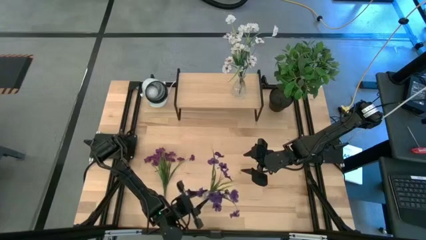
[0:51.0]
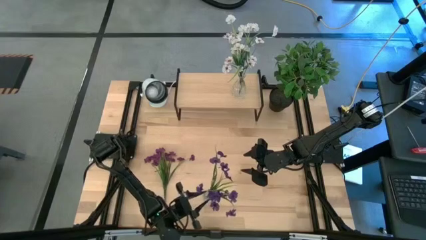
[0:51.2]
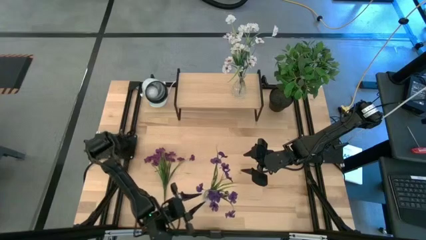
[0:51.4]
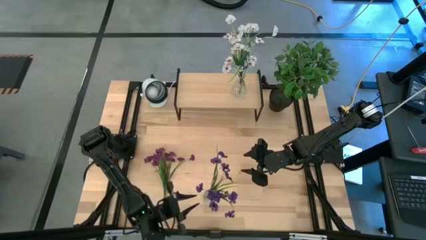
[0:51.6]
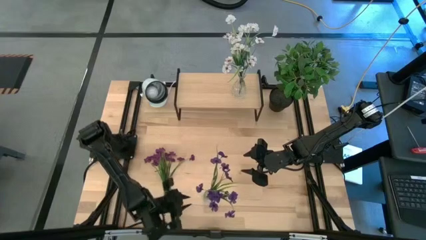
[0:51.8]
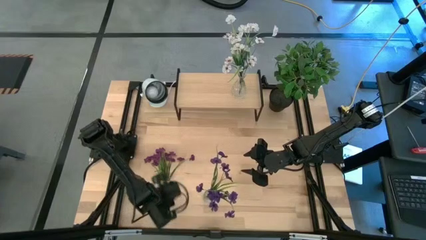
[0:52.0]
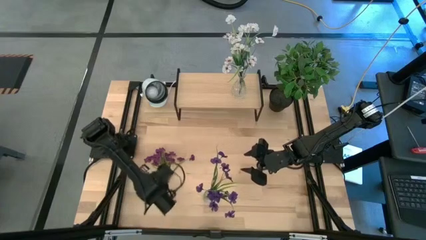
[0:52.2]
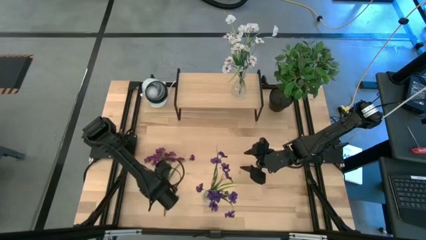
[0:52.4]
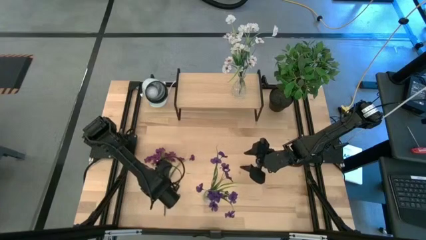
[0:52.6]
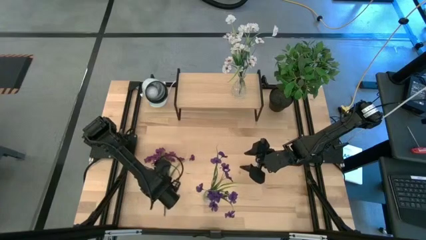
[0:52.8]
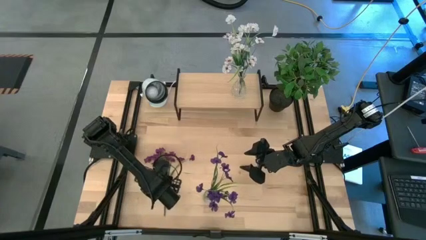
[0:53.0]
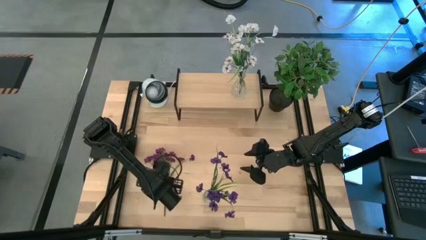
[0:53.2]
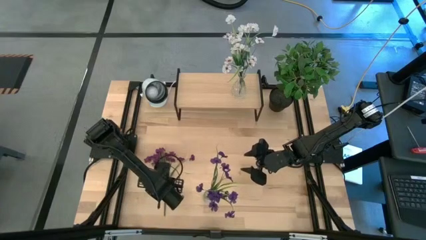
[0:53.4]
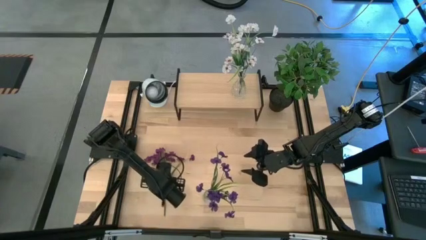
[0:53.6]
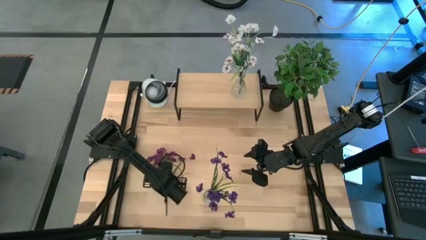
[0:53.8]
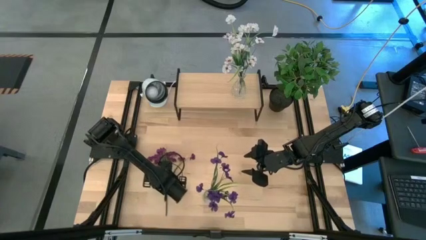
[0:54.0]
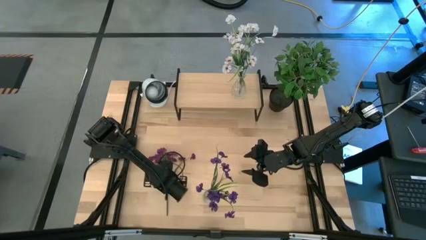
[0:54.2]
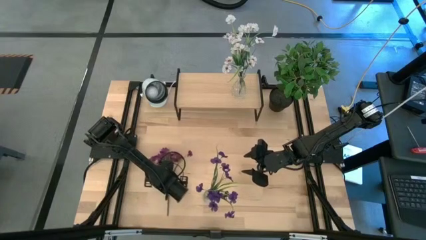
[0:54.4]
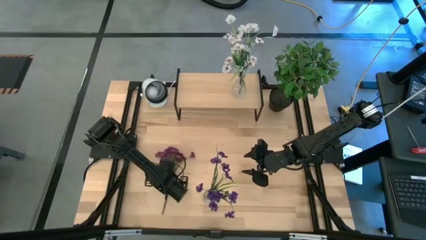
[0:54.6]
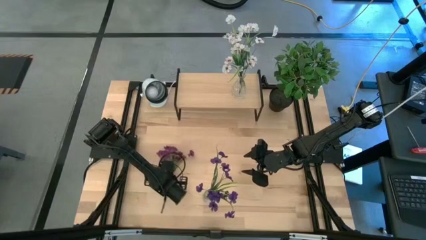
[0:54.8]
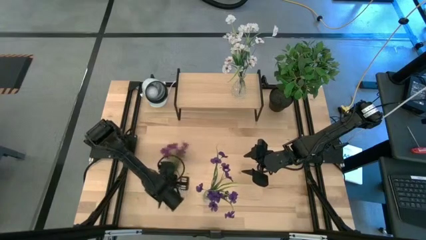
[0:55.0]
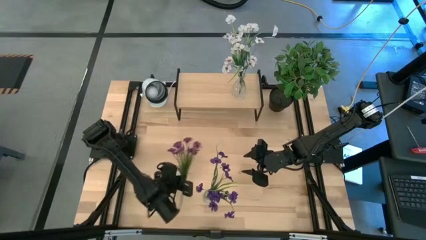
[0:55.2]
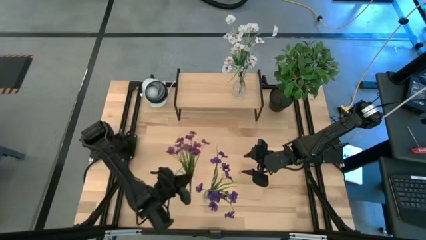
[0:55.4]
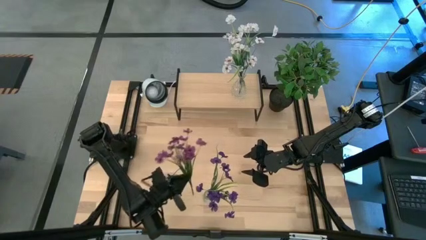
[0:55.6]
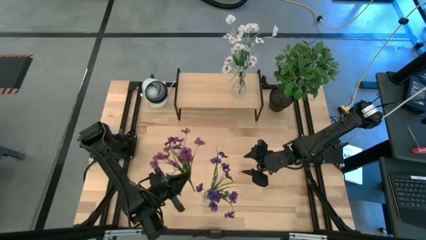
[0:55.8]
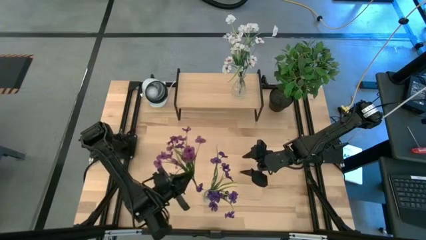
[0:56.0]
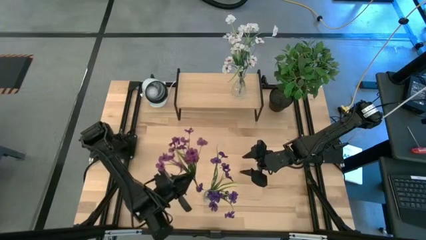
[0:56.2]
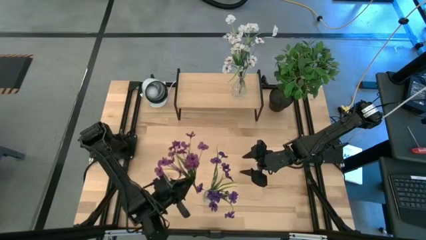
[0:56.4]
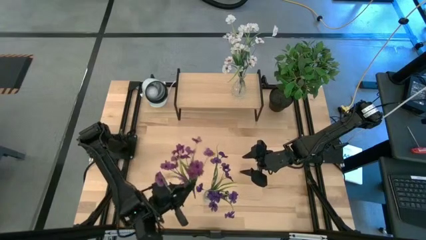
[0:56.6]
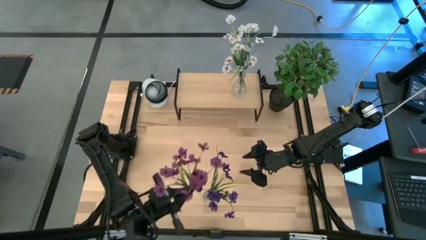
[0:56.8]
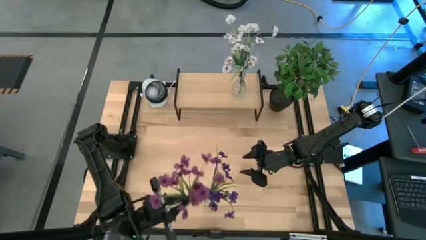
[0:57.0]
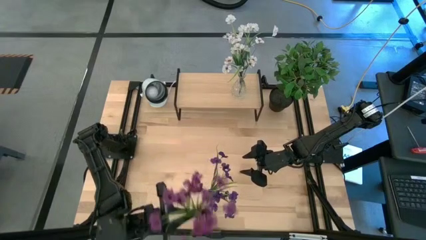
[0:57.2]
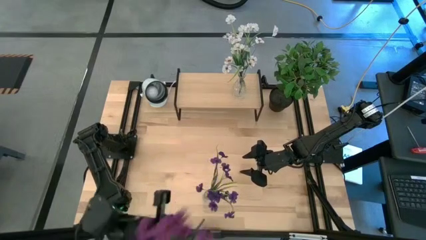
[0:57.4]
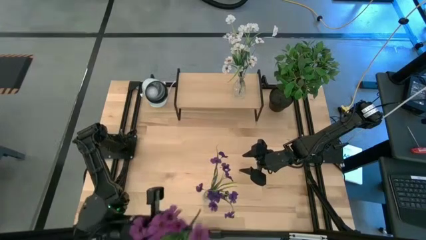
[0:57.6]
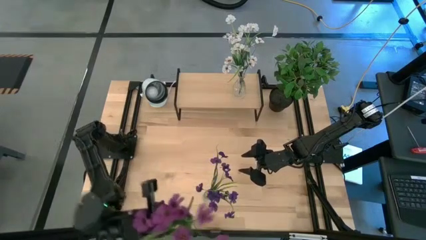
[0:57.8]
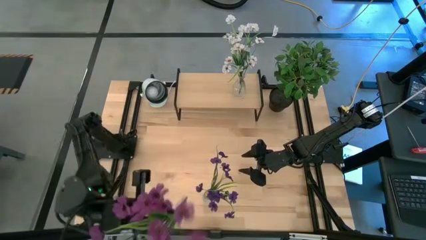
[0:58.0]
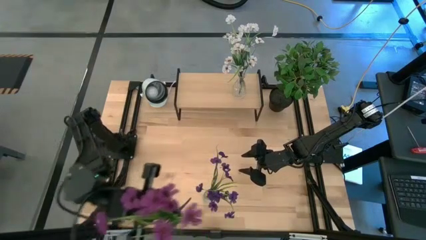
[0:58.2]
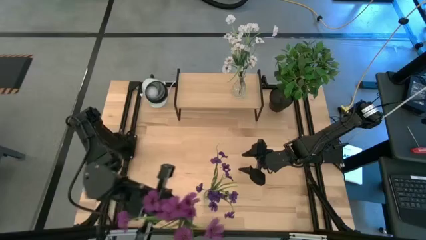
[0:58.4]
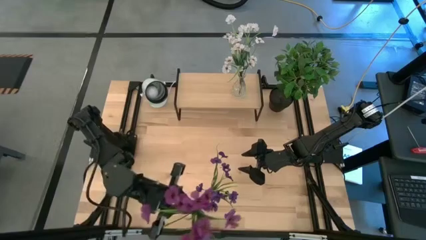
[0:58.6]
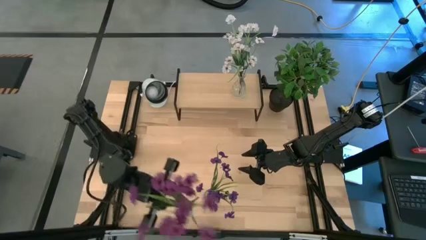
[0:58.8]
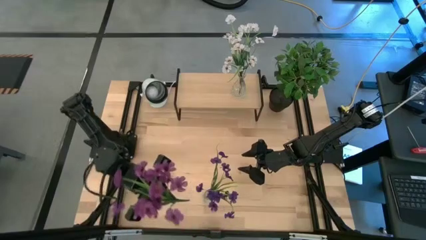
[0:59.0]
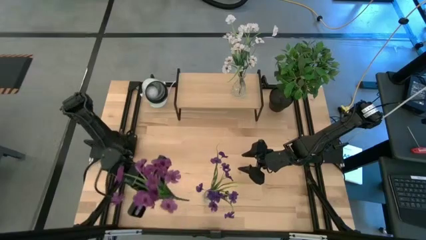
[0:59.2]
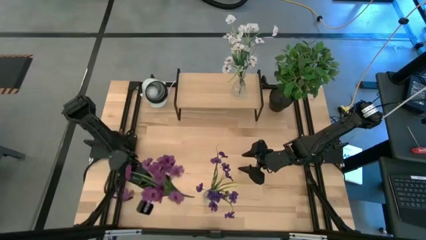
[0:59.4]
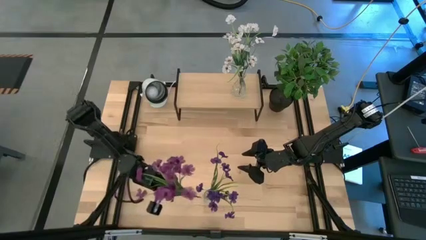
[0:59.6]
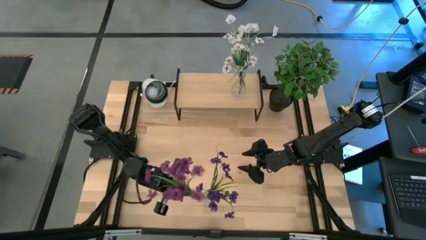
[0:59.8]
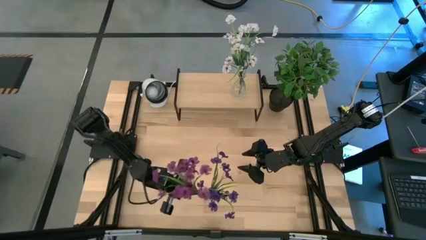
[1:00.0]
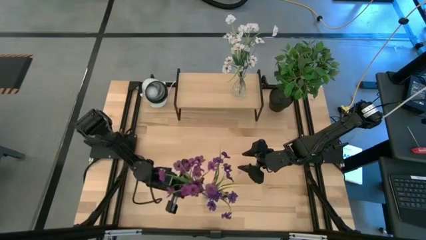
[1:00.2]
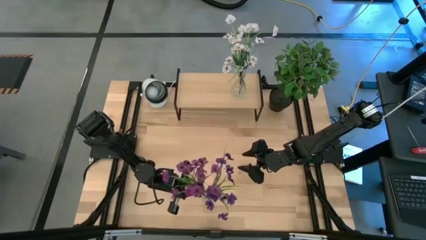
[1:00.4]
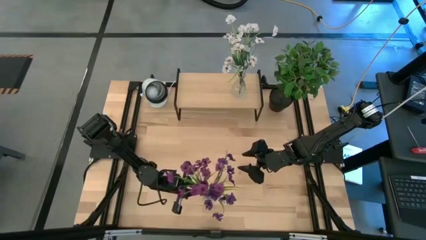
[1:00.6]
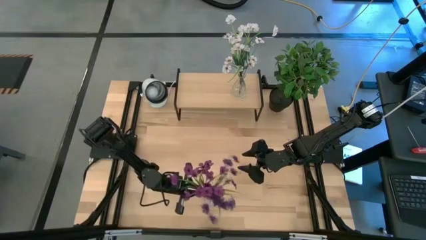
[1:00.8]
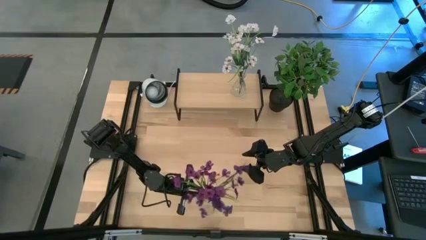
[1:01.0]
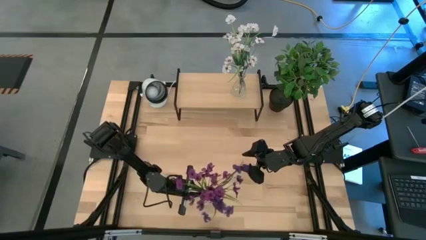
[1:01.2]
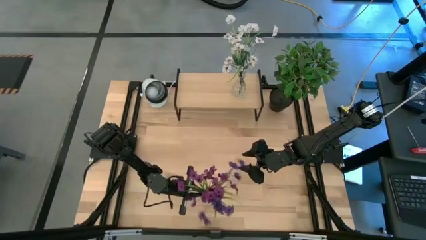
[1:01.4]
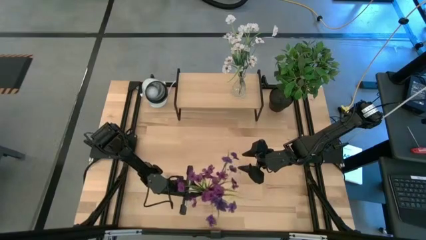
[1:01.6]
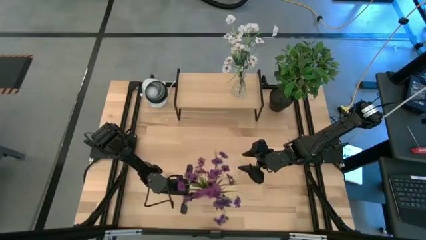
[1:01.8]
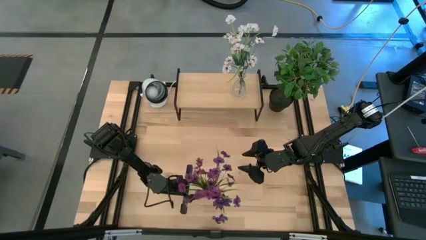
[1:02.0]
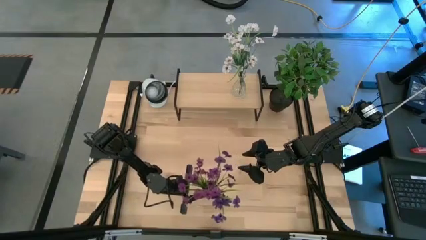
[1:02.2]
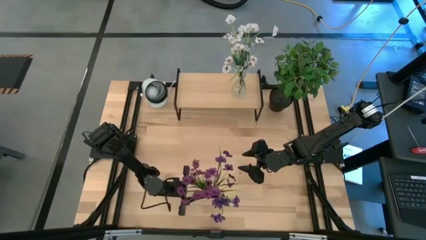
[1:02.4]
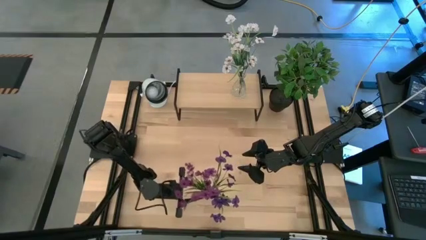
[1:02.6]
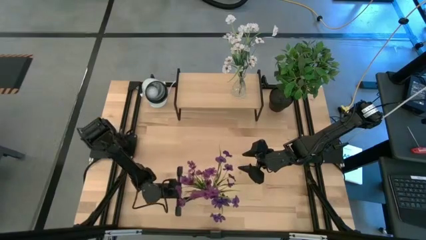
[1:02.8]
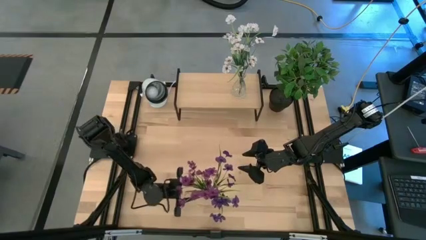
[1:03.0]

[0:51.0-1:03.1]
Task: Pick and place flowers into a vace then onto a shelf
Put the purple flowers into the transparent vase
